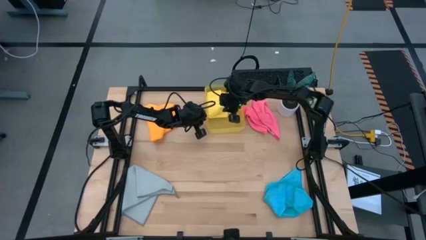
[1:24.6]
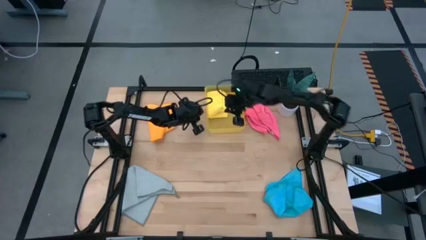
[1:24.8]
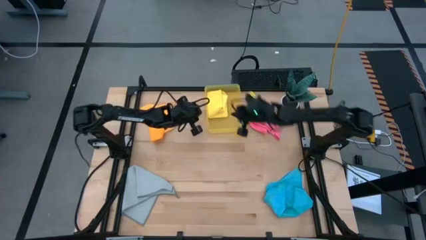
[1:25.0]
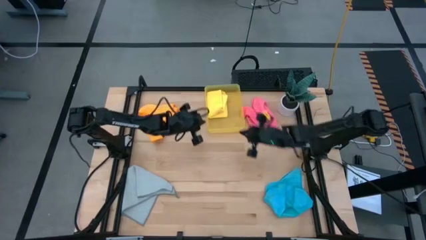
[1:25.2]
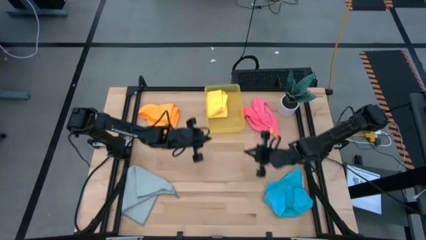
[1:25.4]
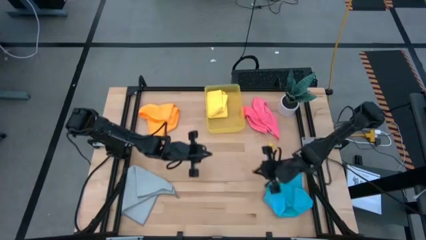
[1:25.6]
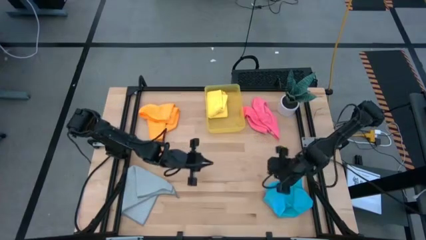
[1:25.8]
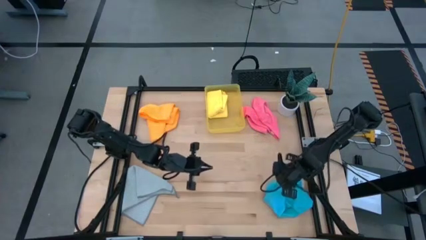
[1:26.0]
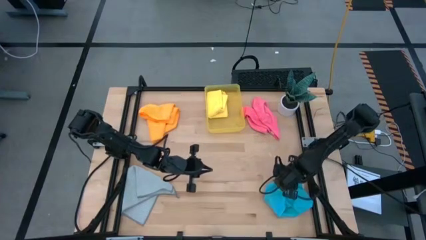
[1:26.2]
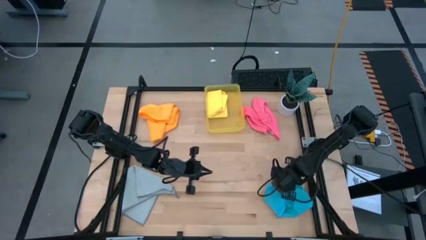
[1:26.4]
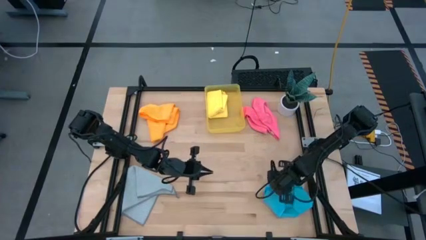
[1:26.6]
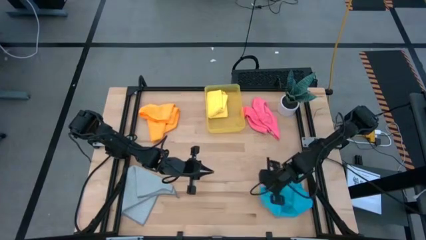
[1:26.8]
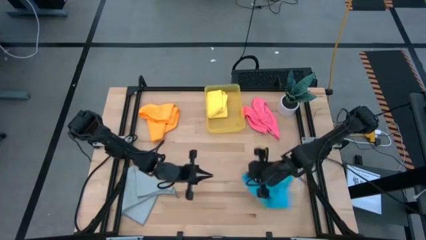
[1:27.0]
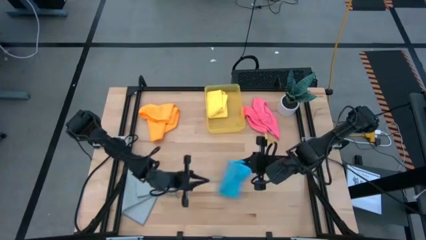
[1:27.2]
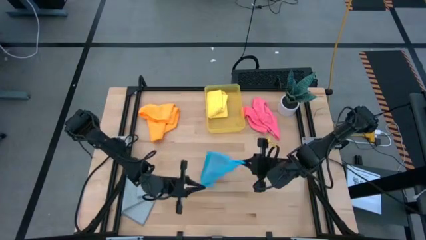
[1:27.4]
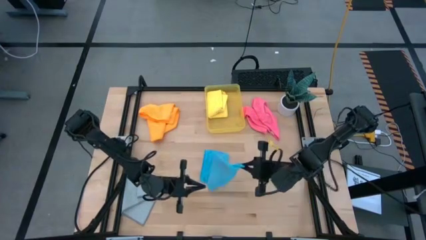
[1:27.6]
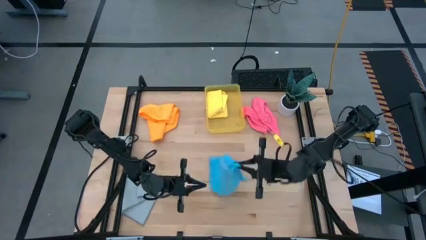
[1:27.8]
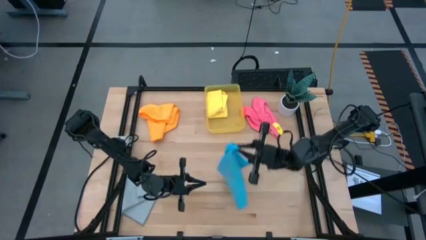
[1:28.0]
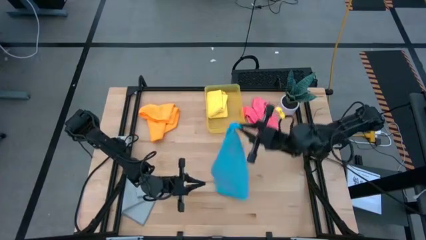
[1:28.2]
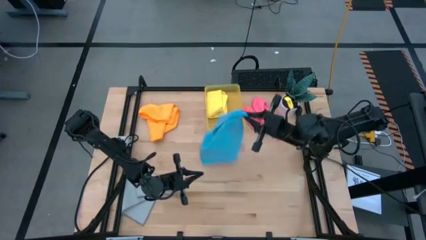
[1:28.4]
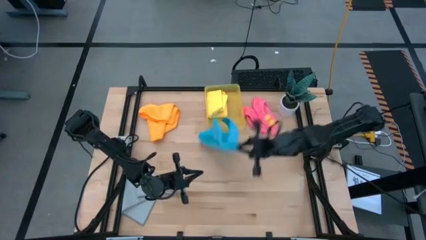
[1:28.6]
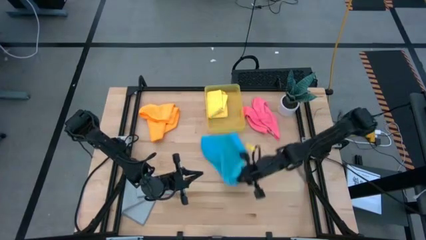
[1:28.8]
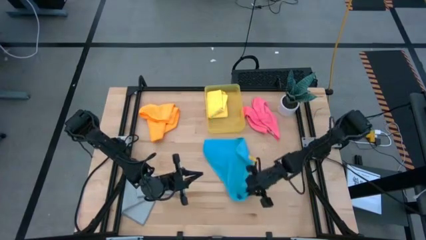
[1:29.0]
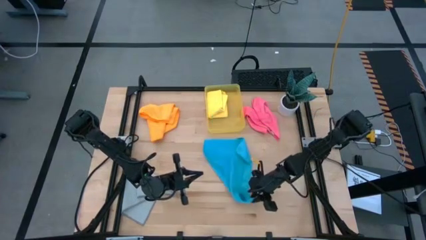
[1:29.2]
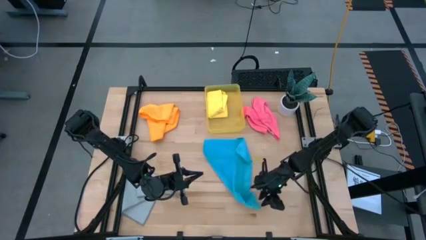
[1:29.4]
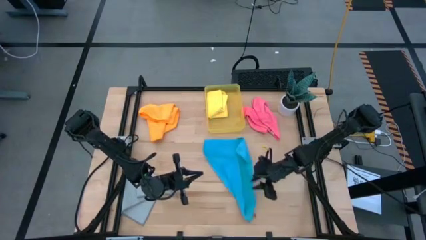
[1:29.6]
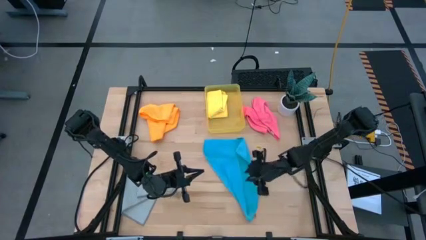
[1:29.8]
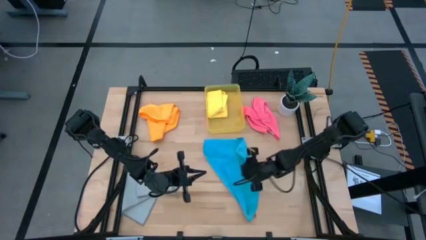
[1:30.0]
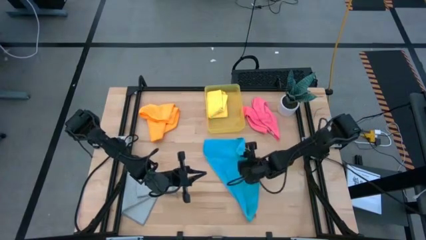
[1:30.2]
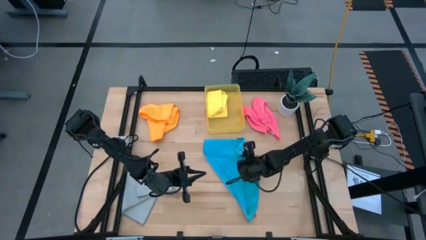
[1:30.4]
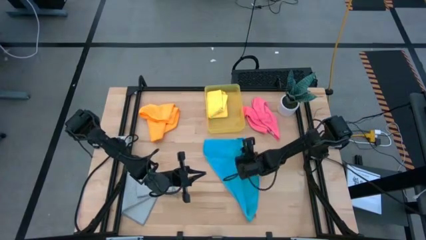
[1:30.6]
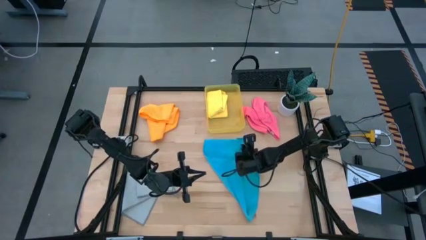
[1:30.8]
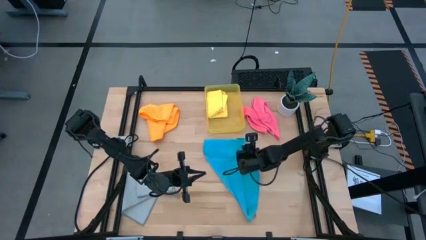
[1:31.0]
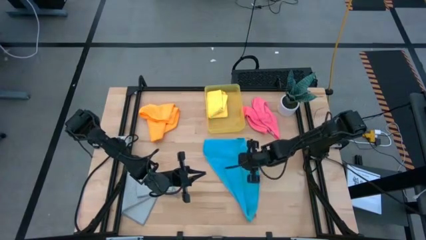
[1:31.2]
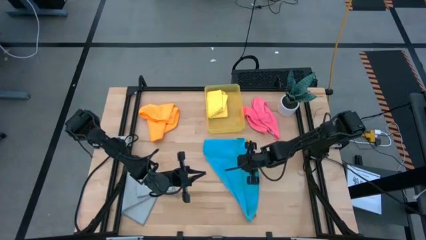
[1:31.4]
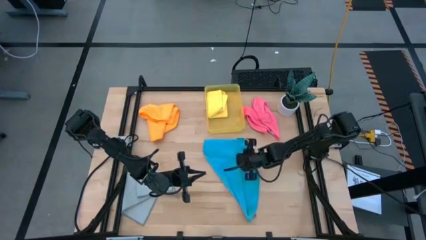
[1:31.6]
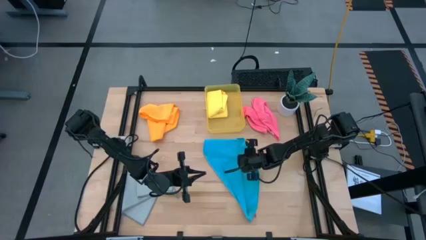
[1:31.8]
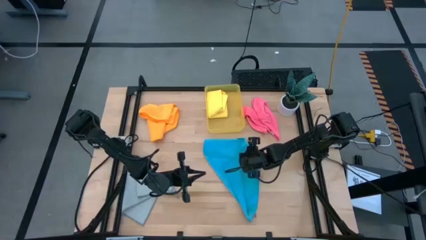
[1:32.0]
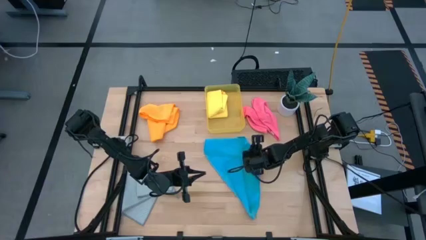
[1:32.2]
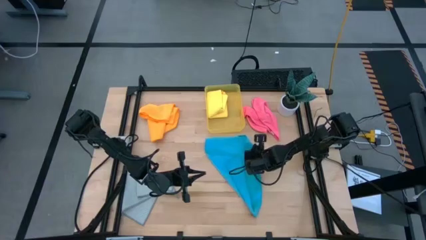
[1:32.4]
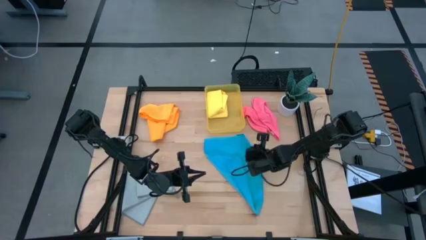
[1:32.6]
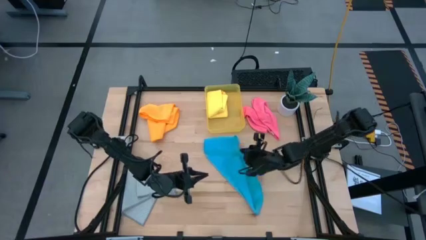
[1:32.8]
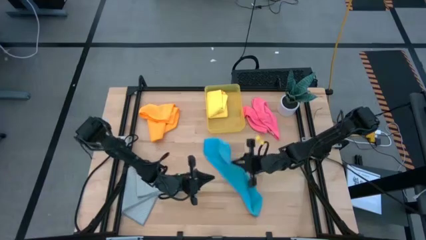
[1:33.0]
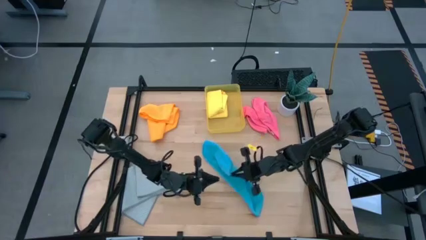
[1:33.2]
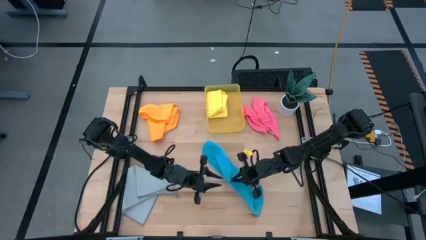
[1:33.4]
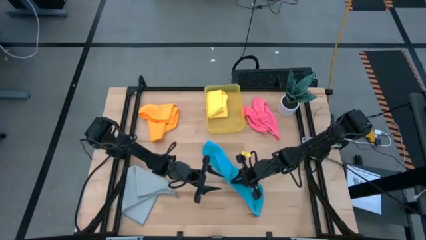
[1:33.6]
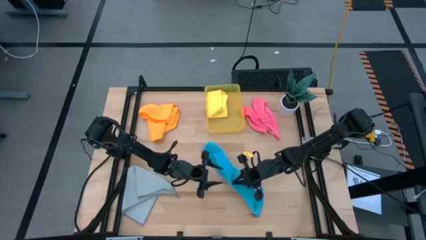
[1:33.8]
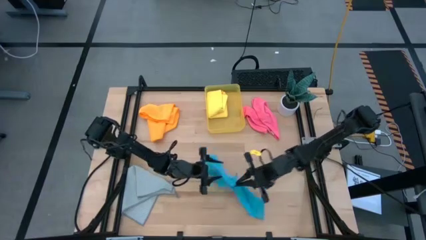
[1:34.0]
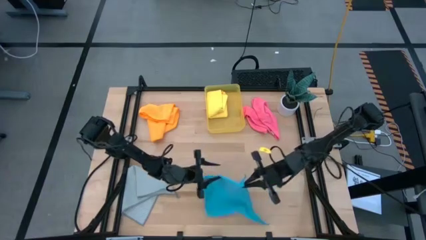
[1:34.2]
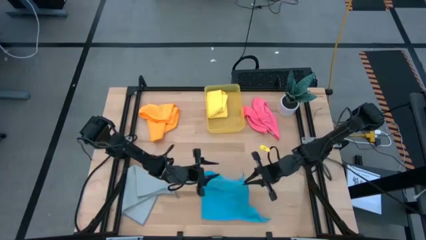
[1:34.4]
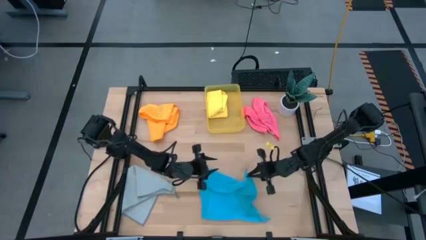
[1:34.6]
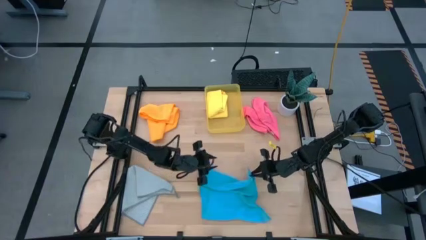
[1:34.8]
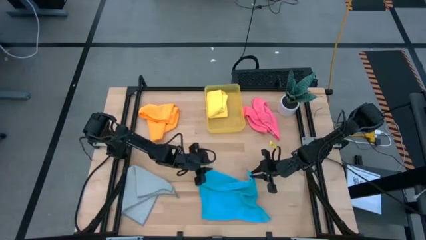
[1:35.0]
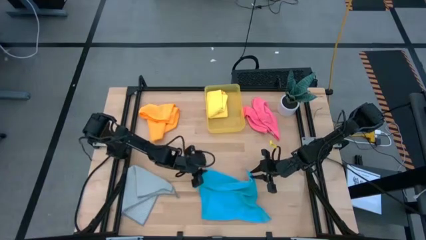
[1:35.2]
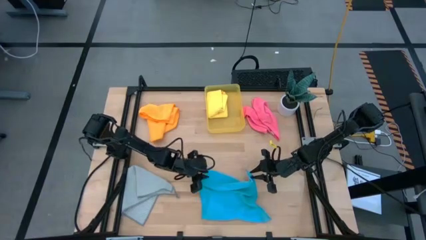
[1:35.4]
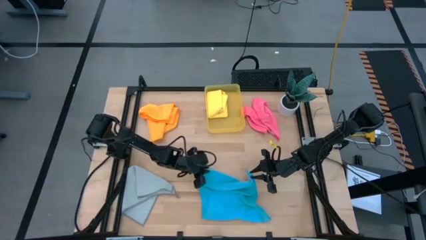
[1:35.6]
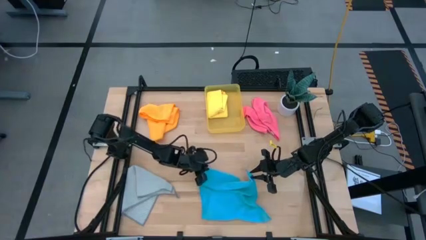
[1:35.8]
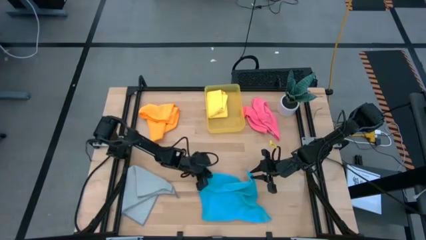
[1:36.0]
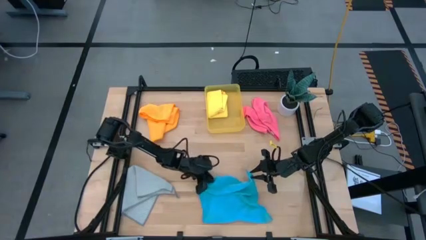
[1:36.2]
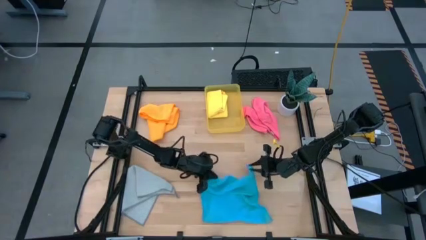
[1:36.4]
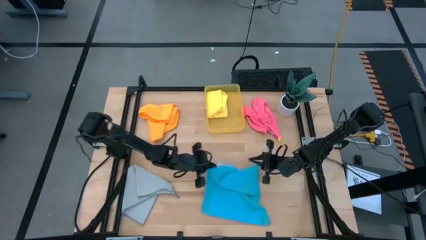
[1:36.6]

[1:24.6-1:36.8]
Task: Fold microfiber towels
Fold the blue microfiber towel

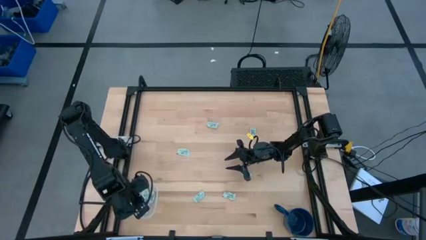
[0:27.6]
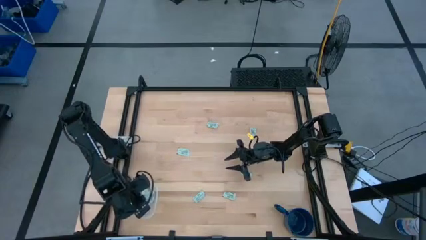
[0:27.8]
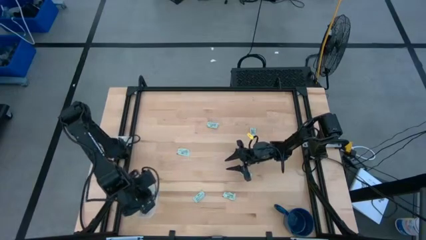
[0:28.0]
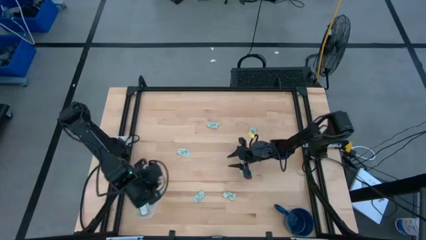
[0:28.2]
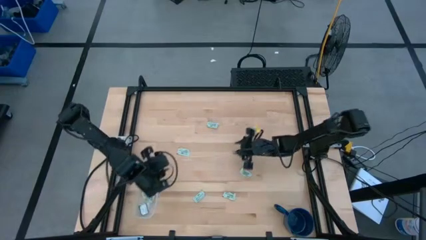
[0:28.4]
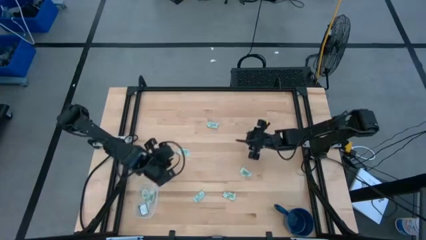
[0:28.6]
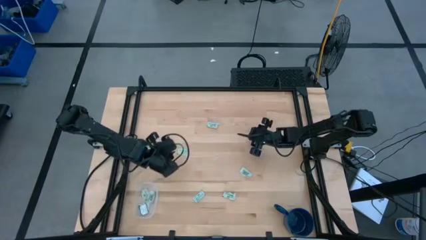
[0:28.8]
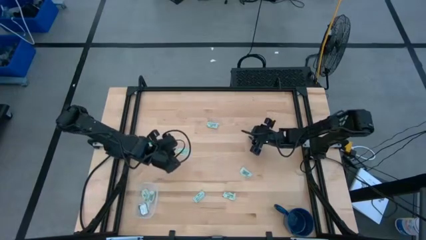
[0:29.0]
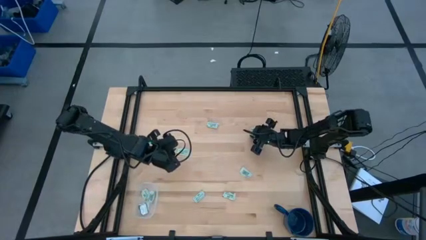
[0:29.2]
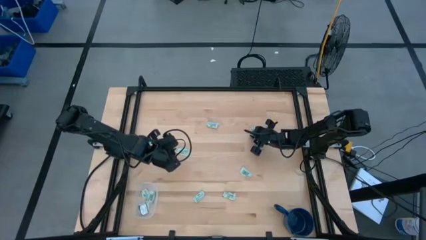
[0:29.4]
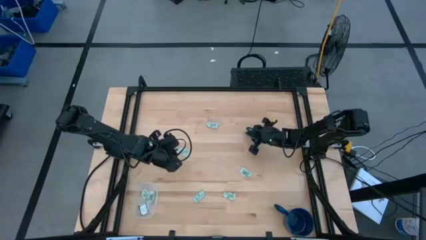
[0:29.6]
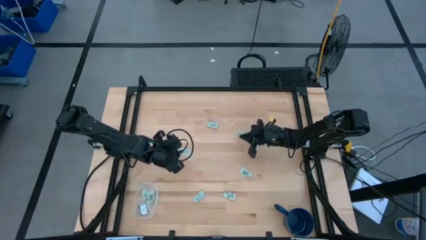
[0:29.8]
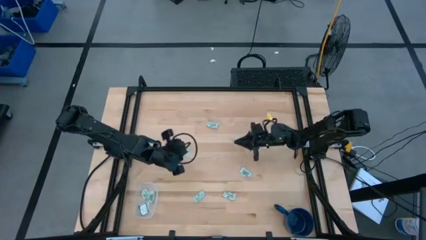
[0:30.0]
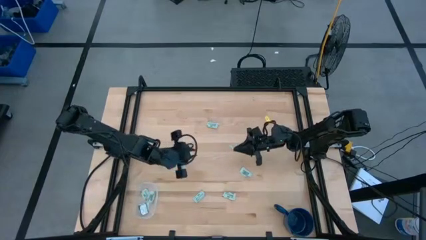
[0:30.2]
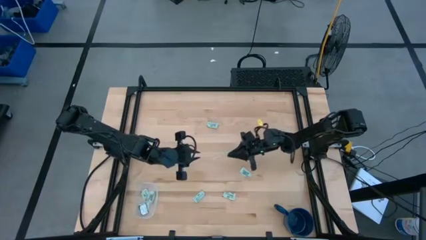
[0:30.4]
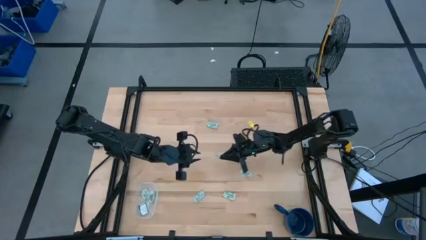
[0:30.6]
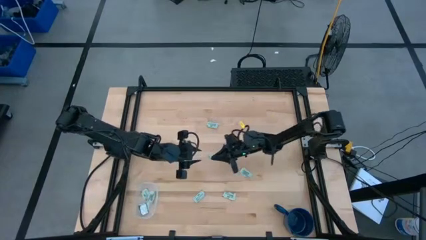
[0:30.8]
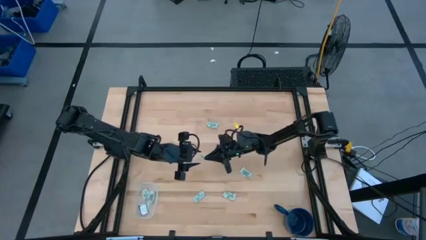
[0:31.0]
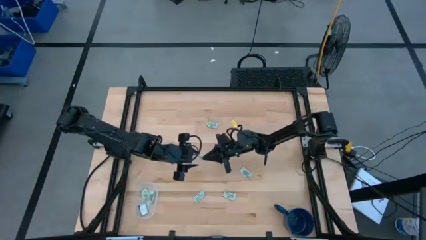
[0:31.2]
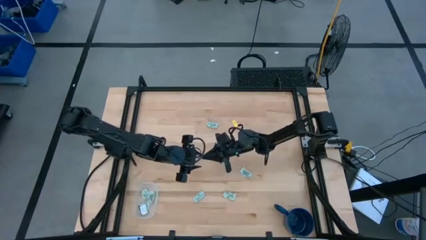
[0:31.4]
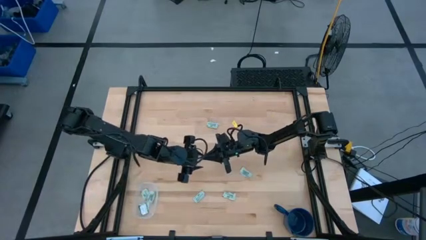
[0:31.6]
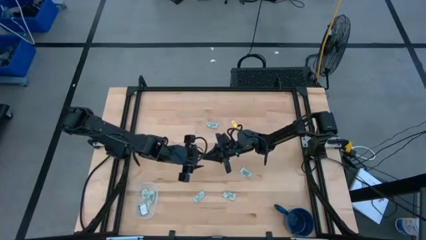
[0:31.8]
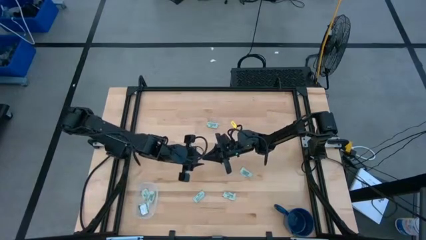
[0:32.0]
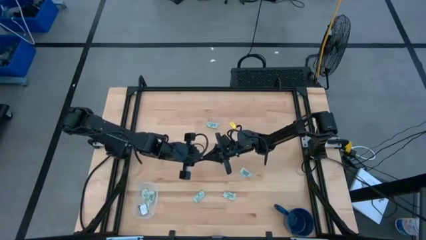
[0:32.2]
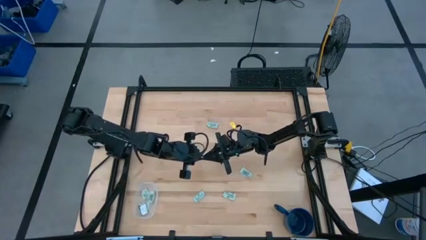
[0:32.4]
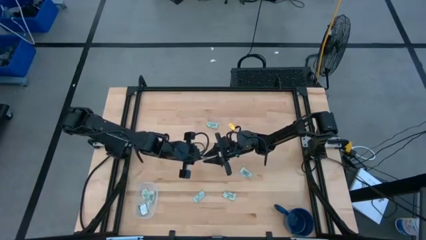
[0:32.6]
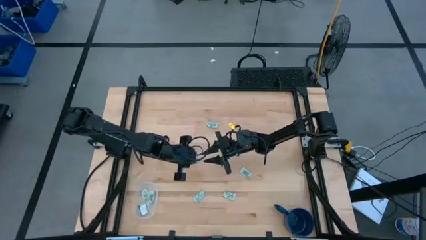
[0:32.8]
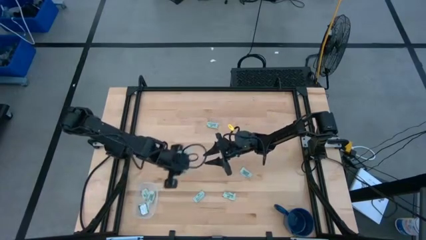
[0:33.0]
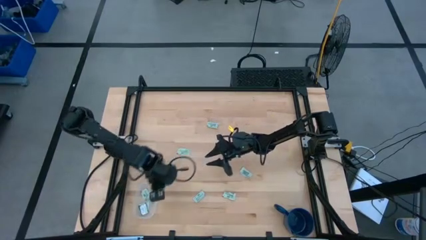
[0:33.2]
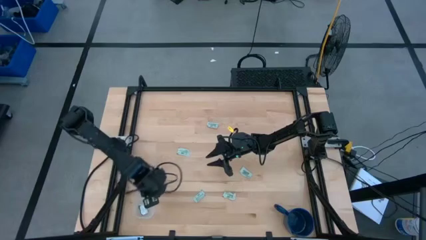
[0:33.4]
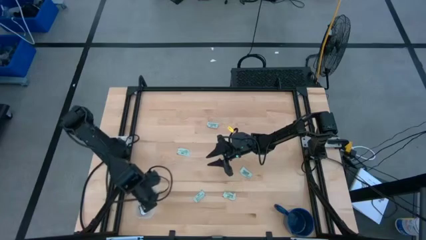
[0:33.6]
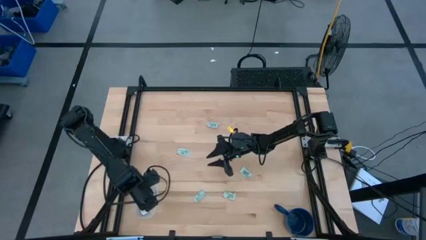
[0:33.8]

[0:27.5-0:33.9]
Task: Pick and place Stevia / Truvia into bins
Put the stevia packet into the transparent bin
